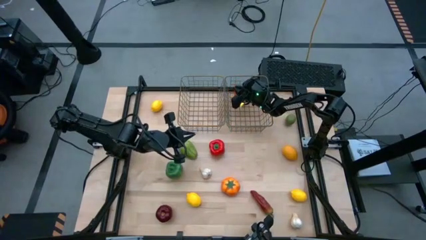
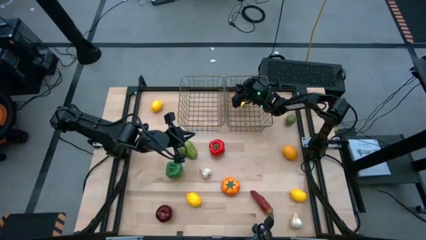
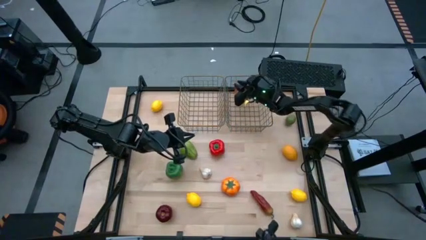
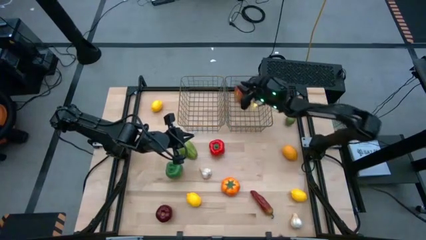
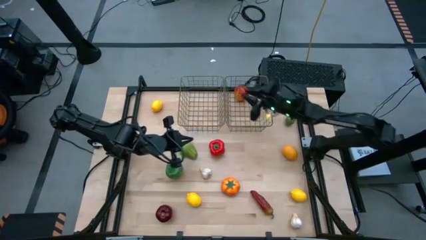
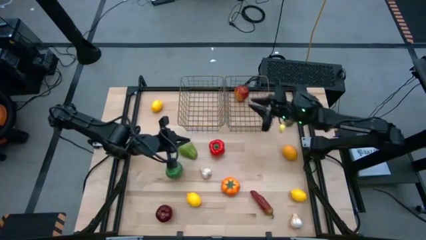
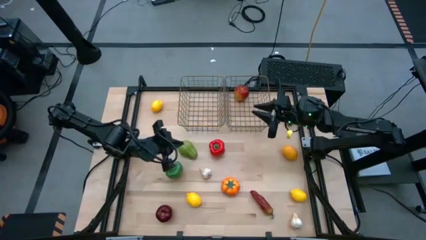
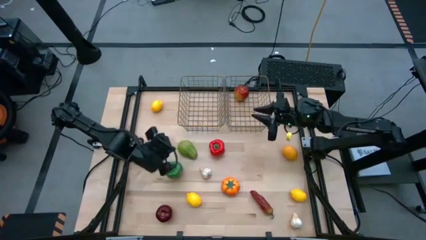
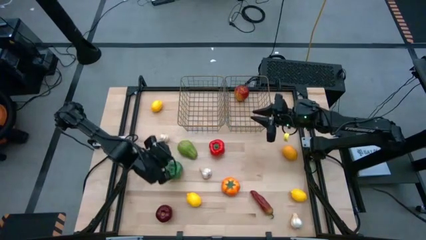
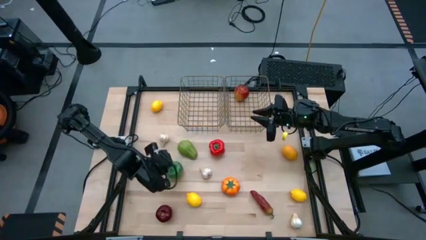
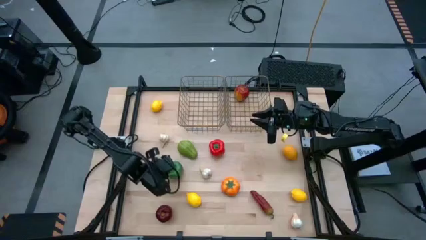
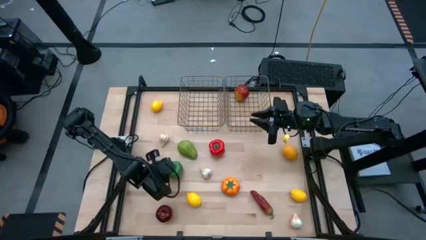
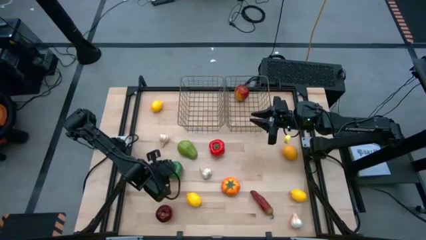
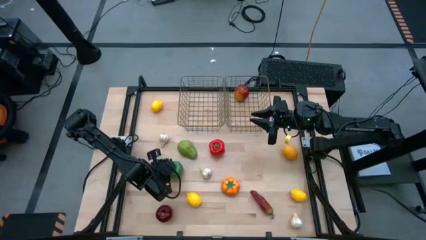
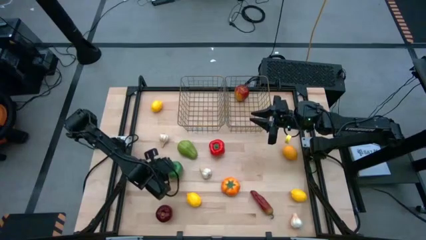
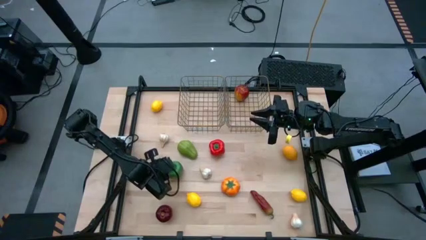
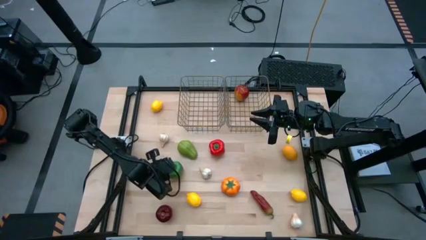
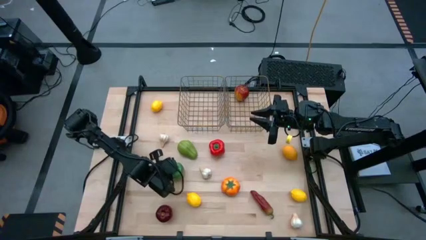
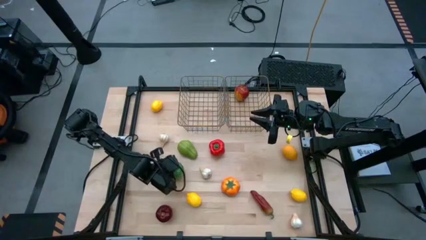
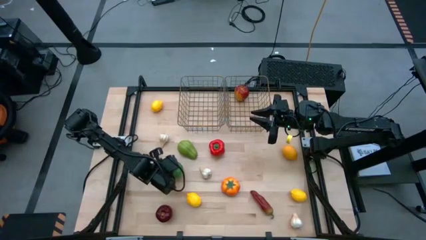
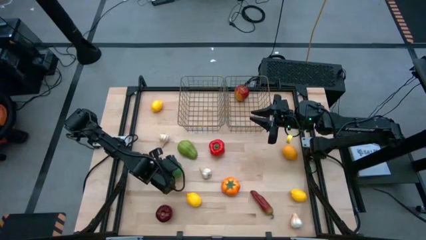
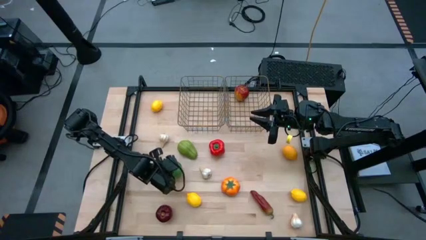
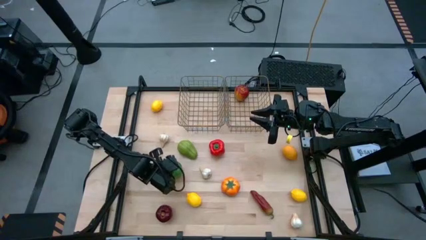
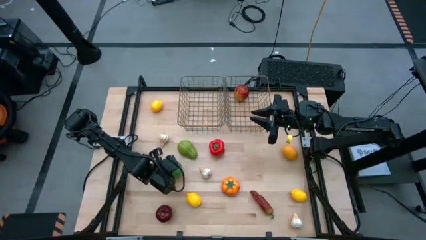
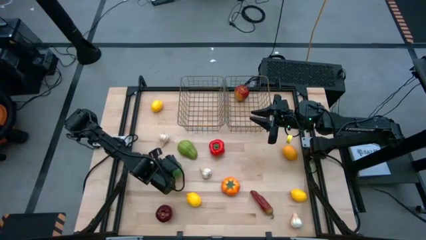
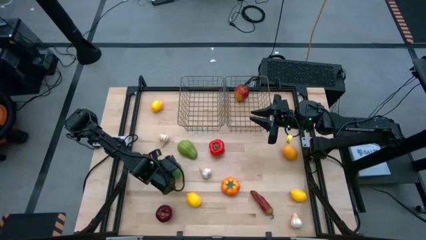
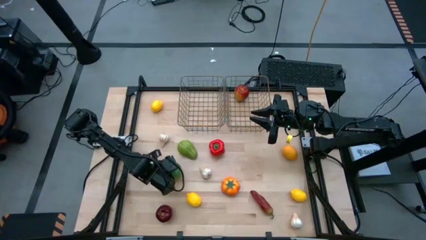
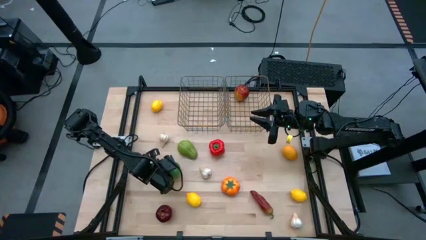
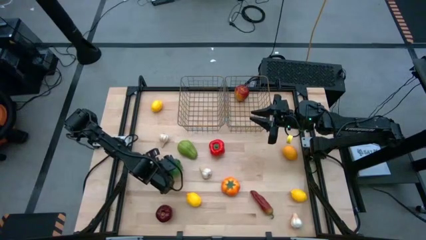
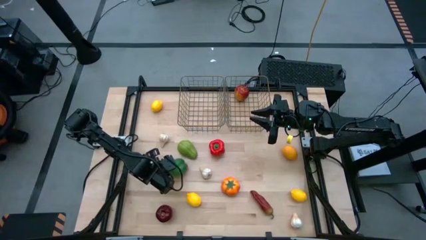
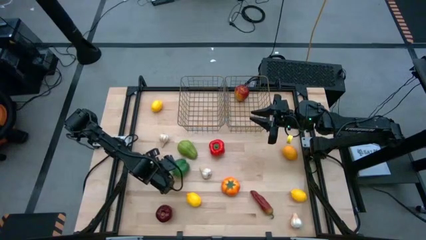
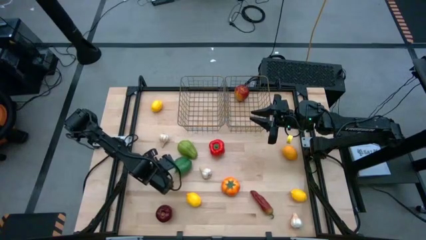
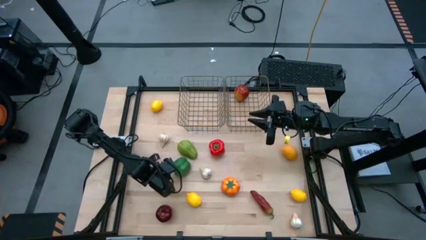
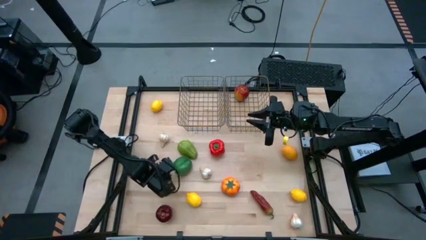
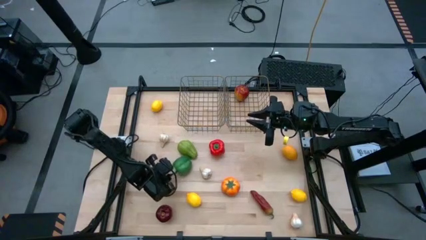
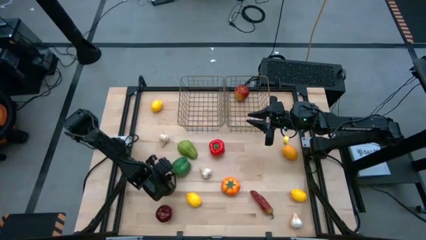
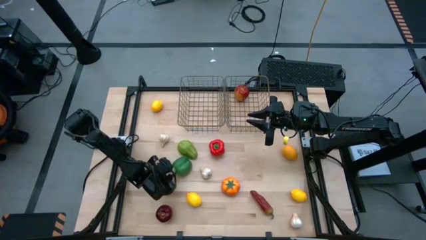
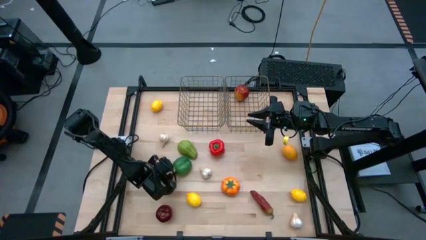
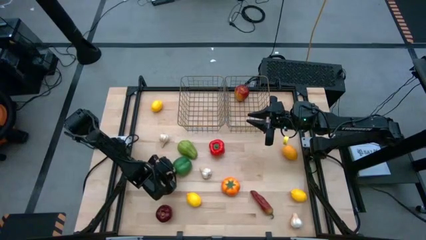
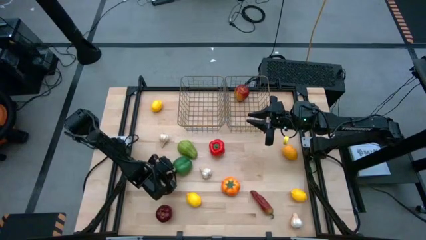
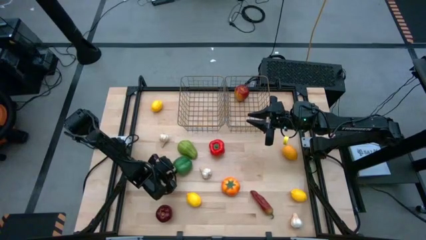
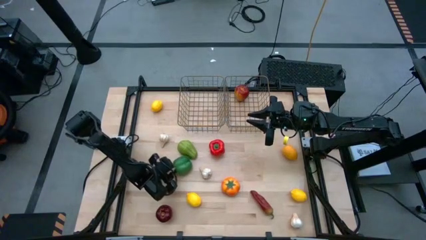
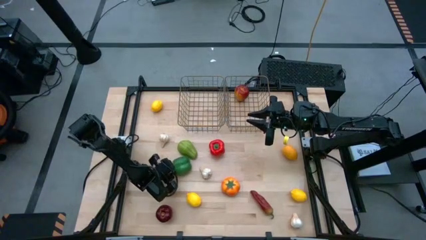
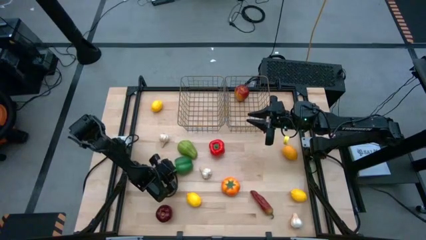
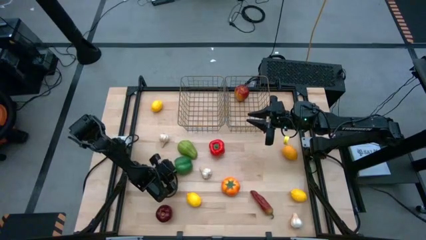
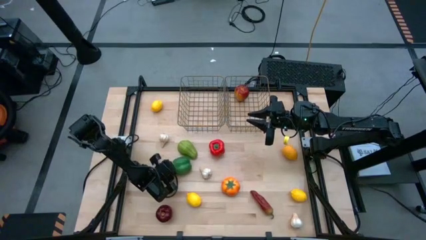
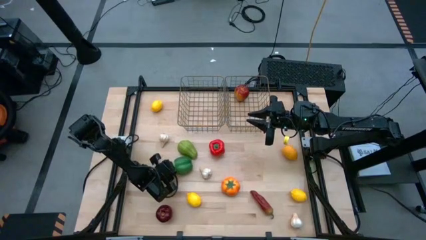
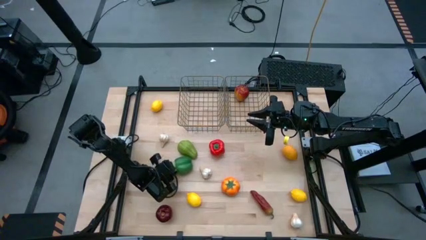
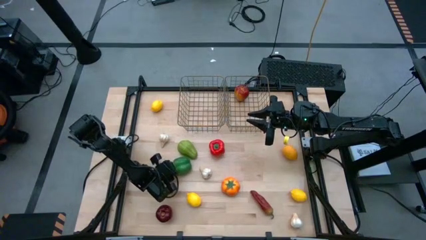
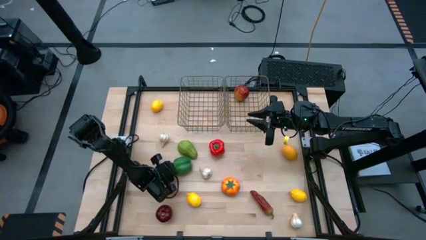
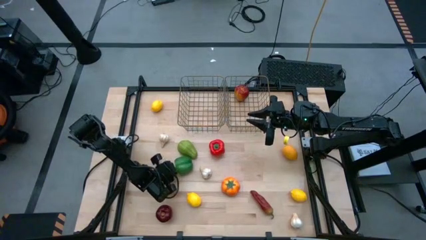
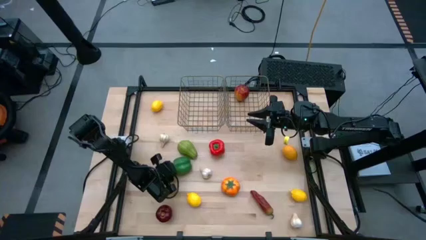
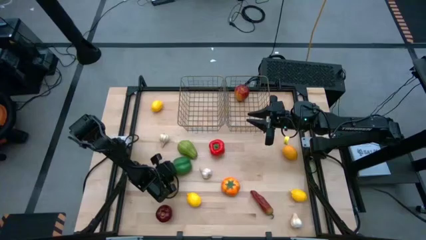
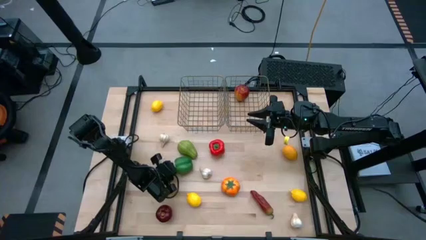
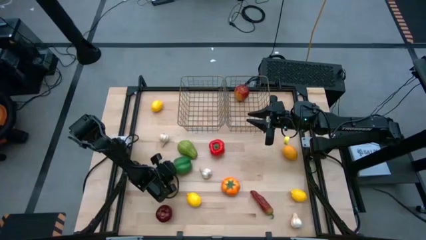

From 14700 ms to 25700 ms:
Task: Sort produce into baskets
Put the green bell pepper into the left mesh basket

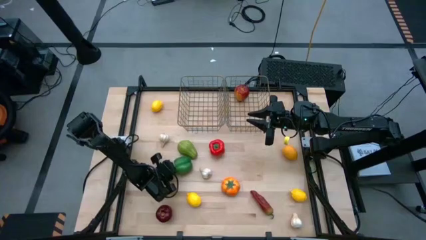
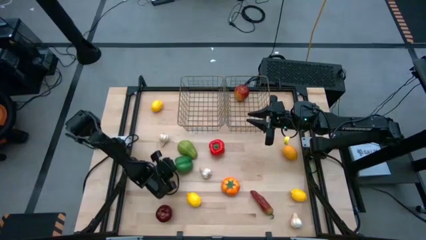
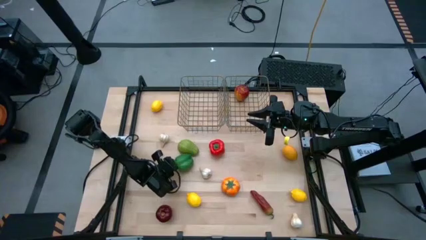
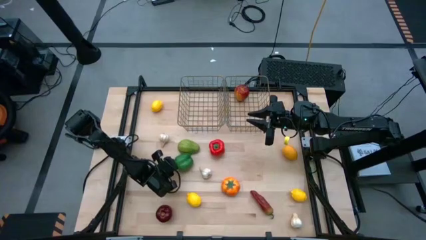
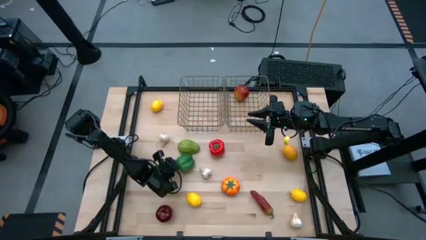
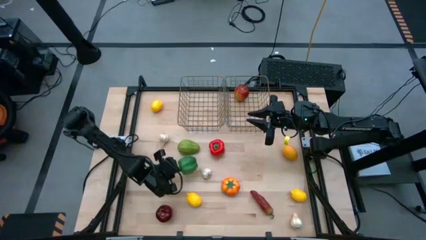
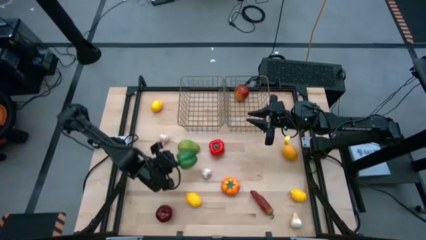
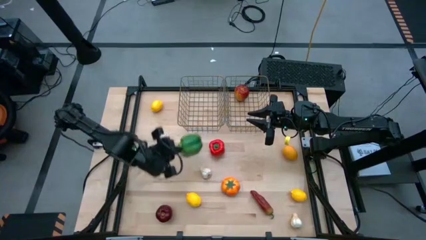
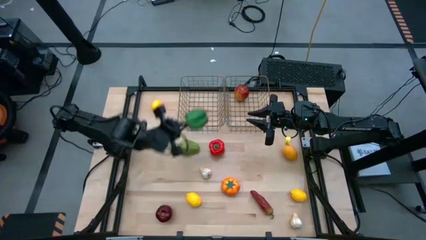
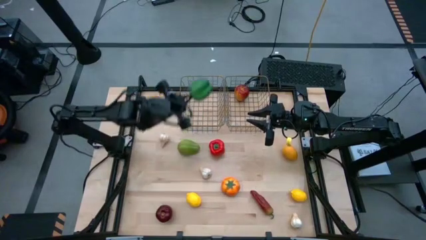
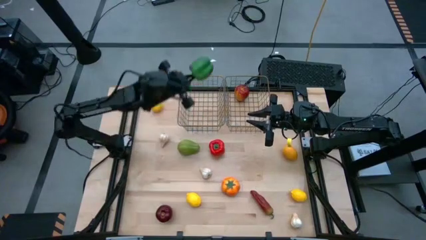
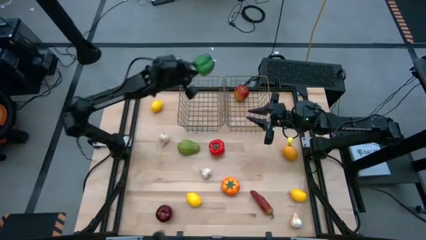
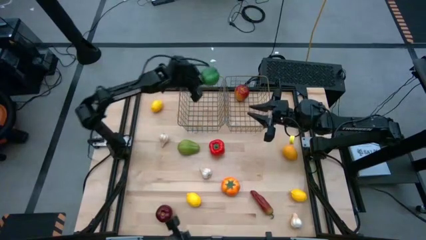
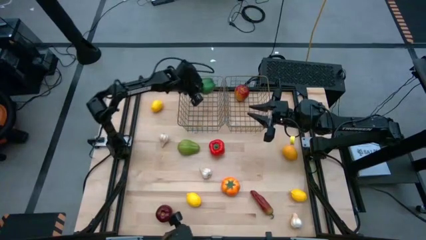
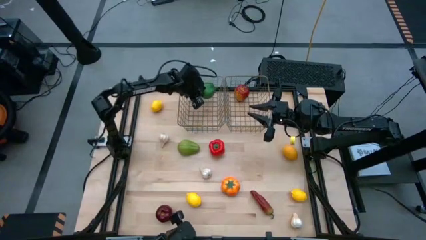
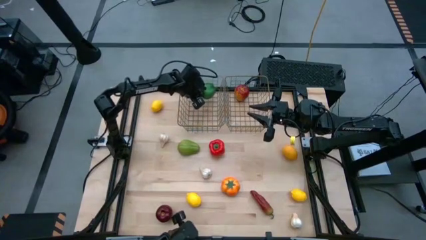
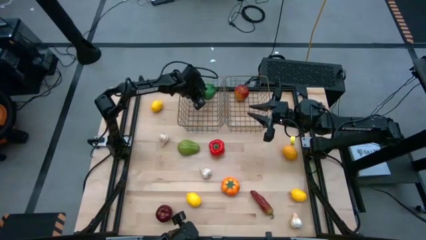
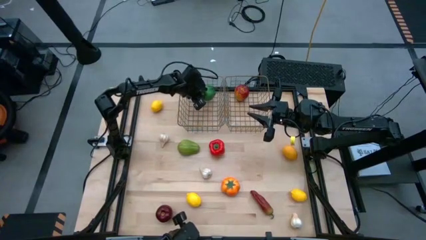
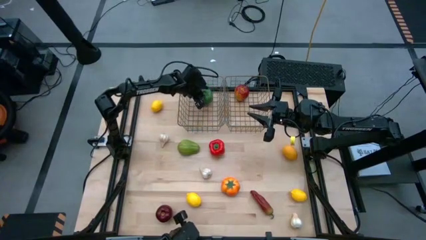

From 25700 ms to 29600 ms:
Put the green bell pepper into the left mesh basket

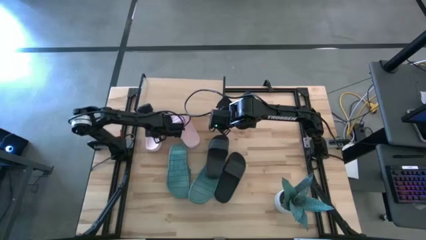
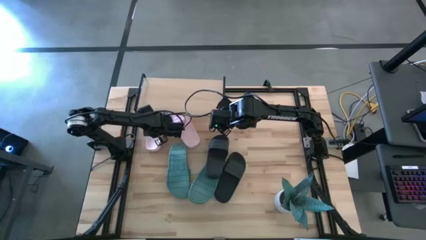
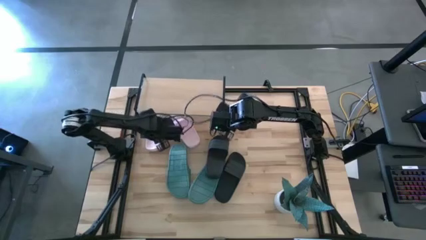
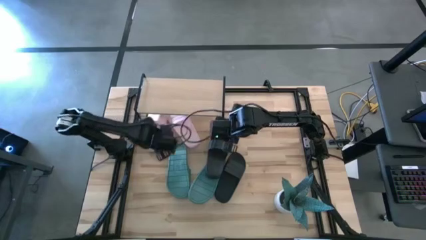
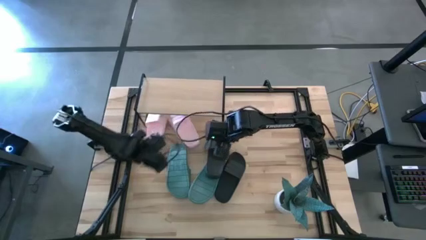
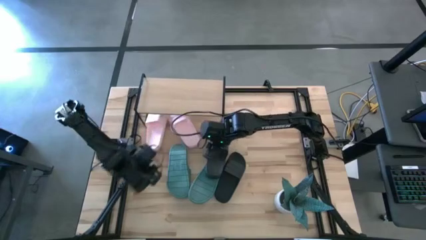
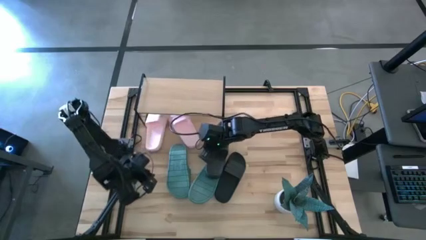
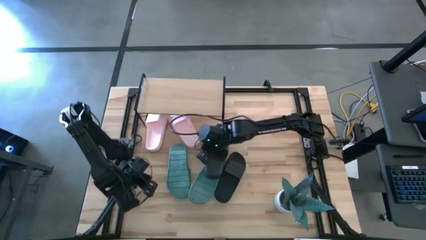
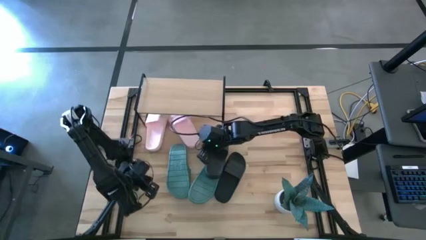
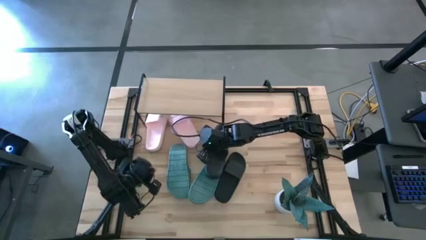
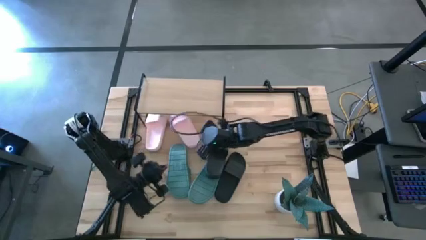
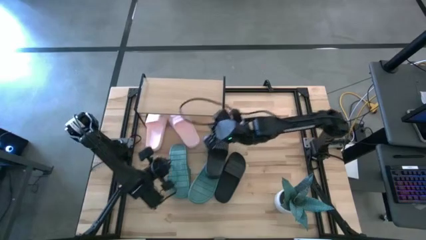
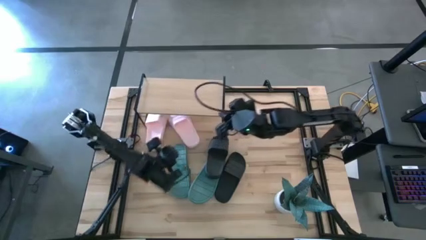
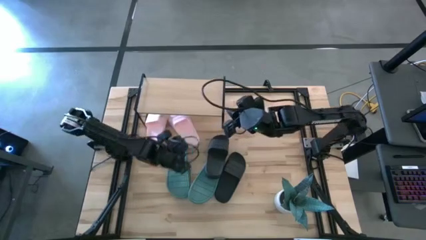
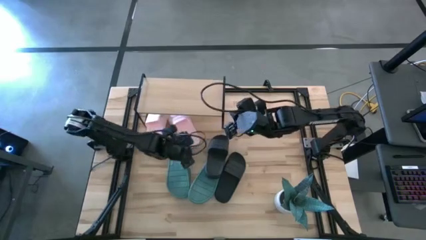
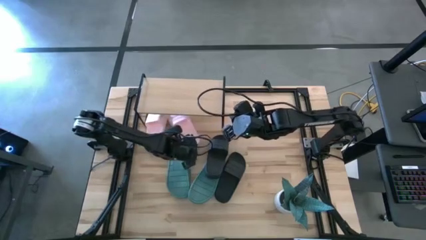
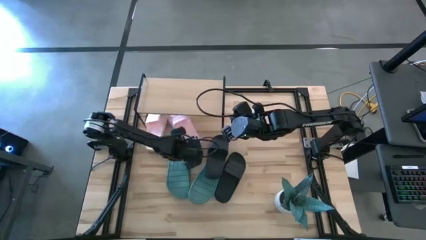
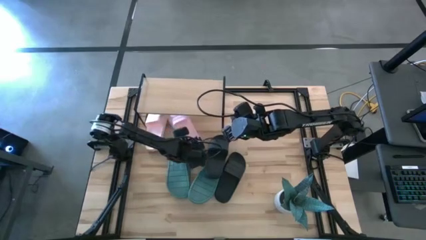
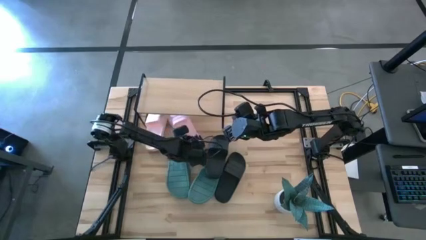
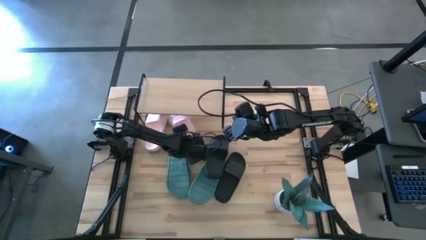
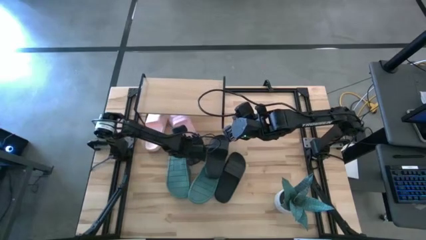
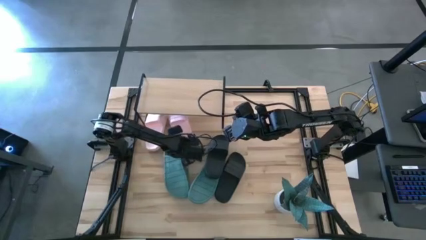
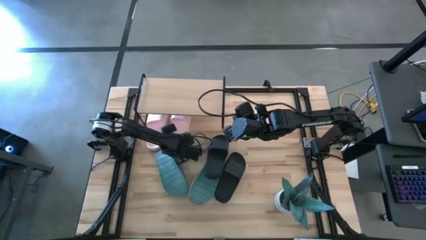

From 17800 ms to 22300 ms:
Task: Pick and place slides into the shelf
Adjust the right pink slide under the shelf
